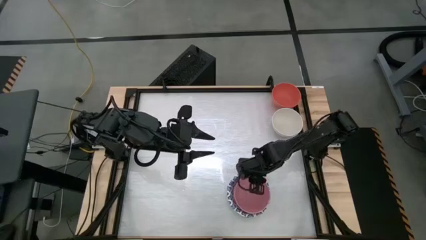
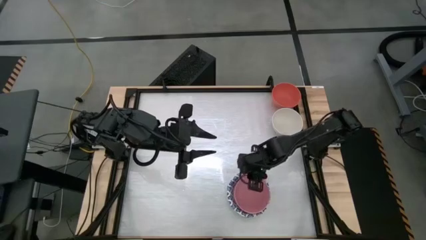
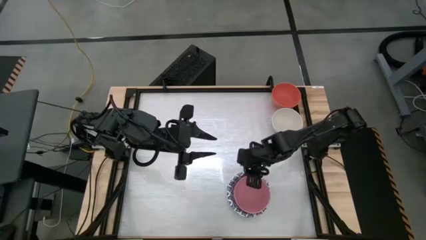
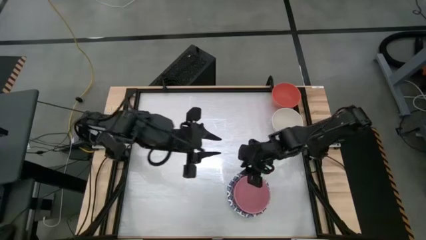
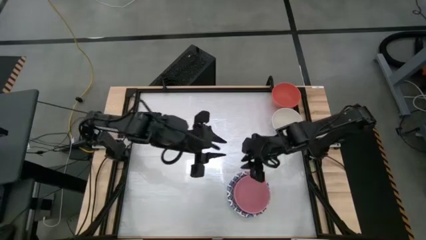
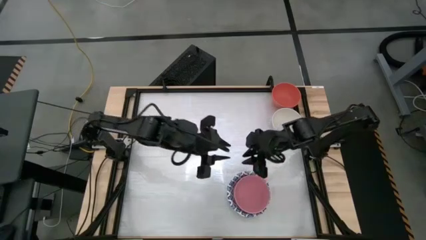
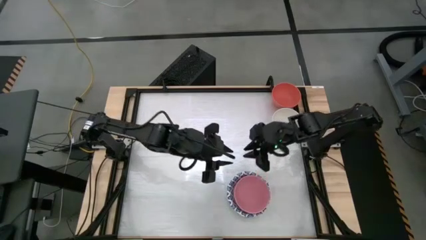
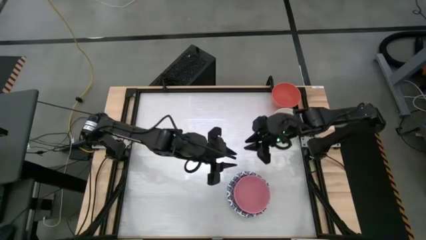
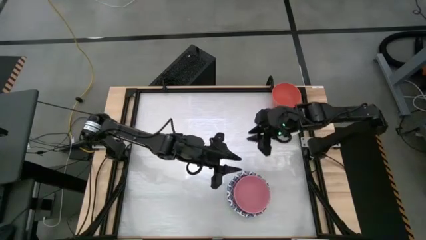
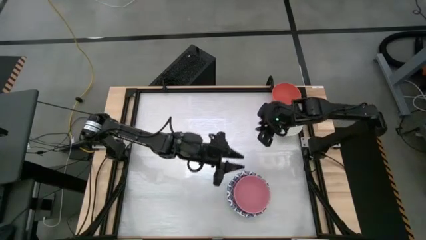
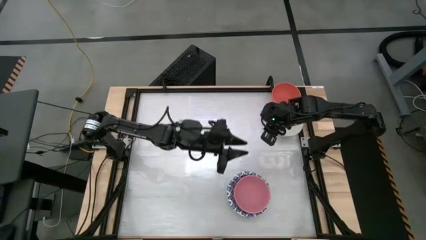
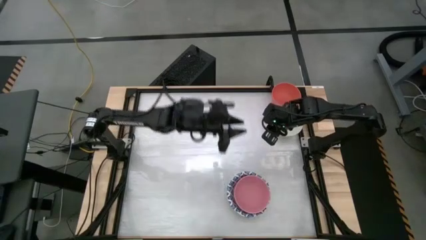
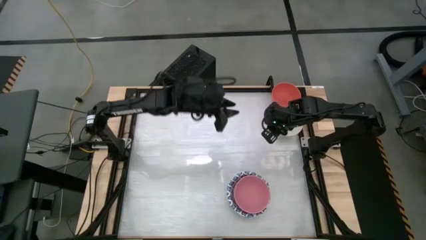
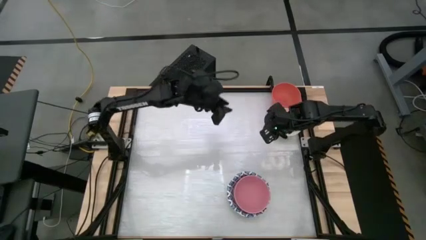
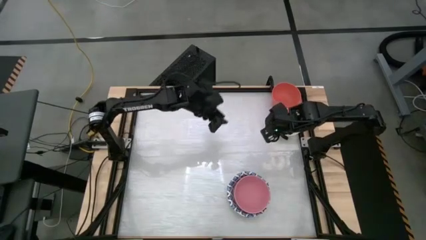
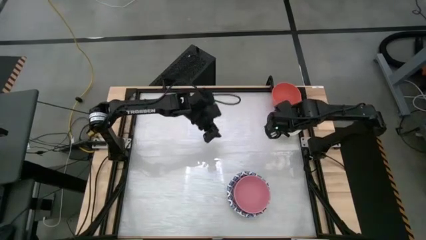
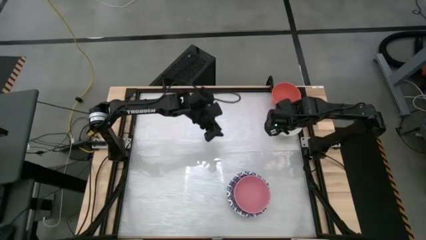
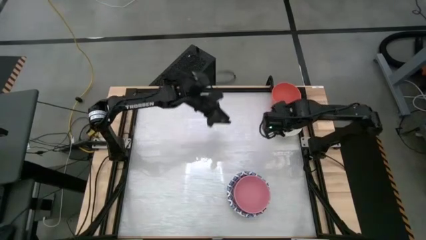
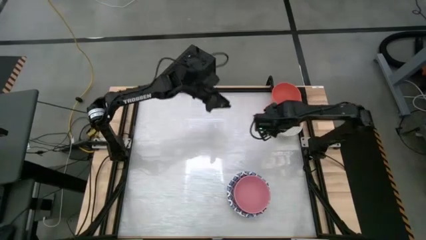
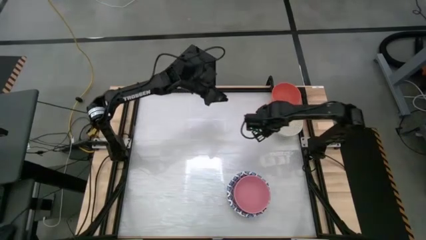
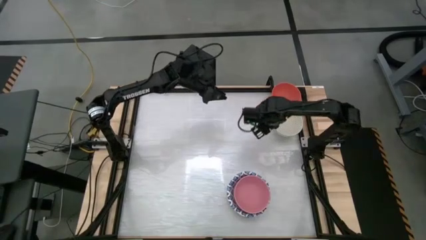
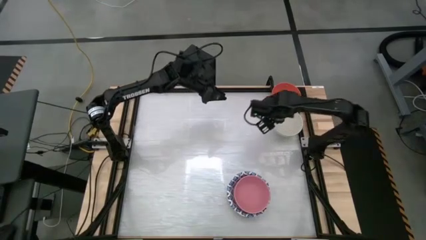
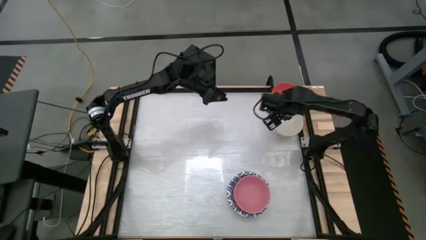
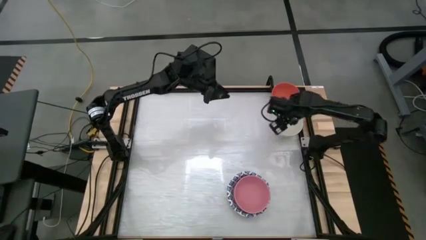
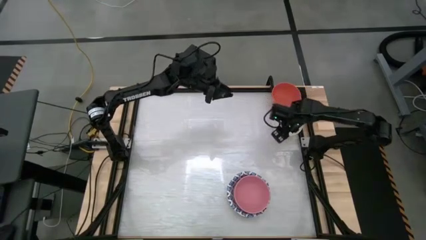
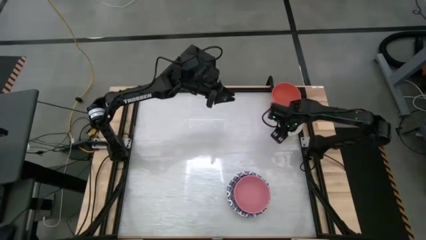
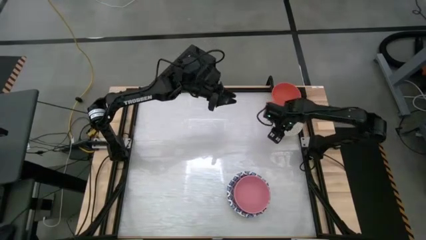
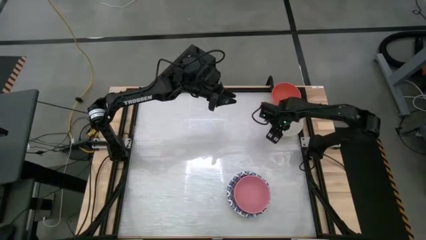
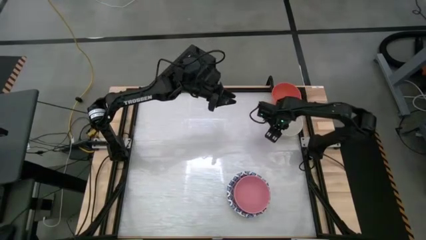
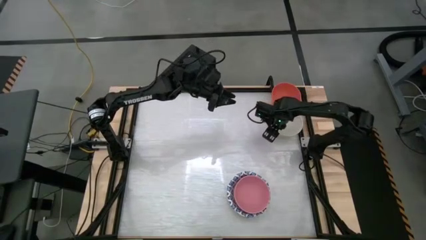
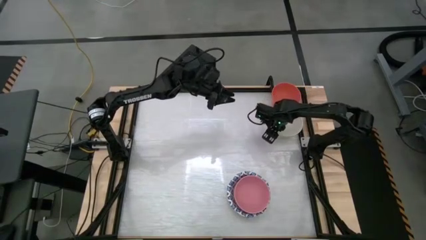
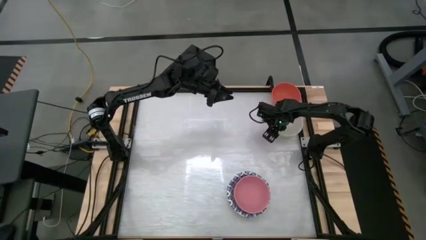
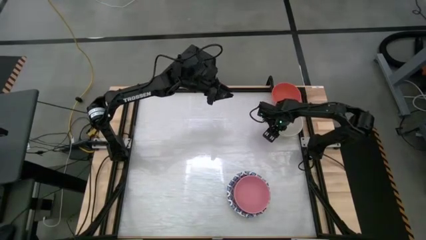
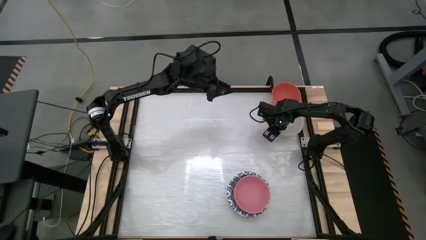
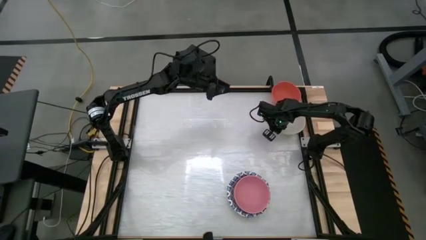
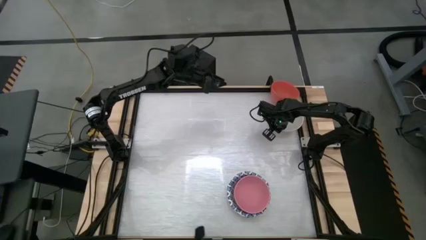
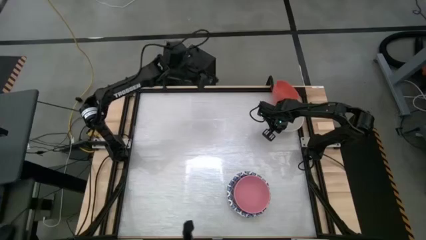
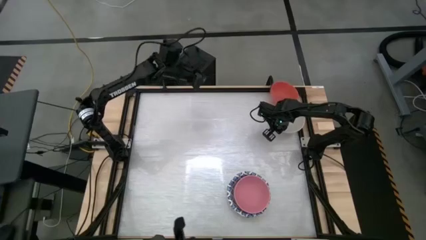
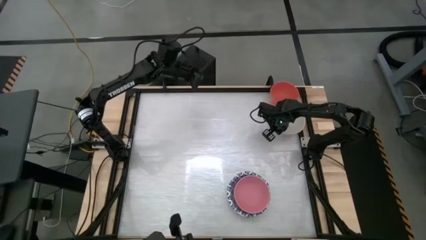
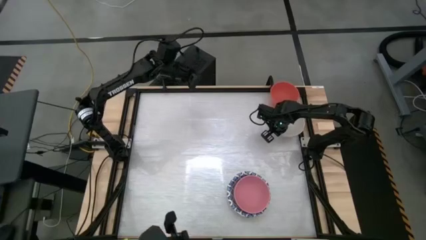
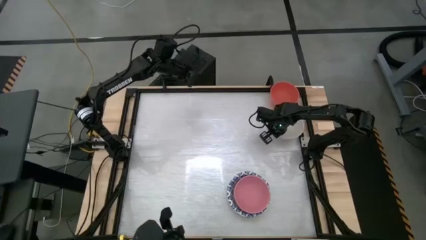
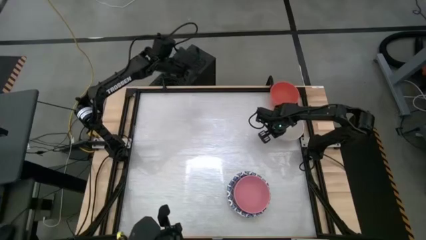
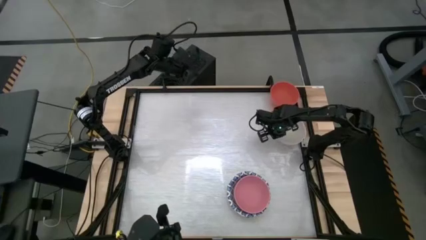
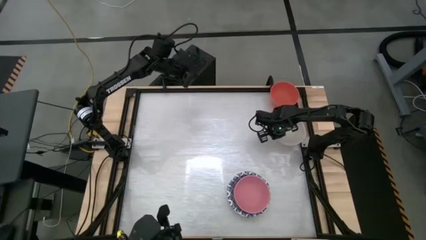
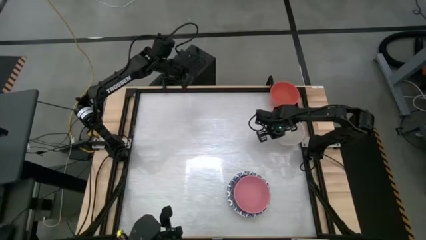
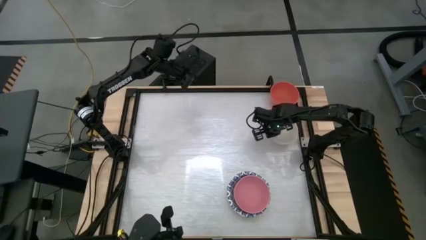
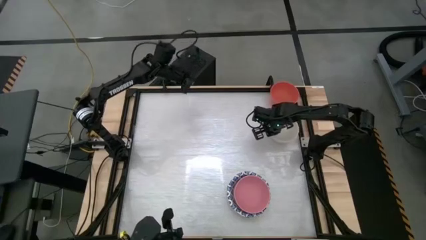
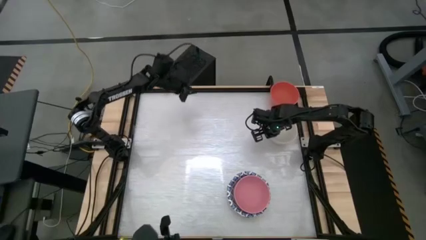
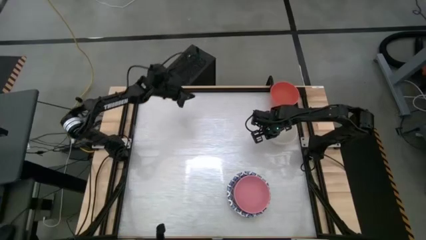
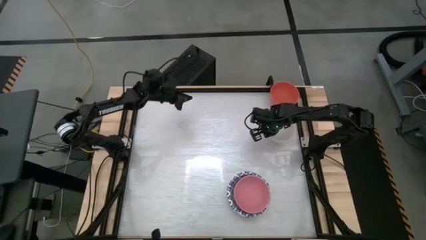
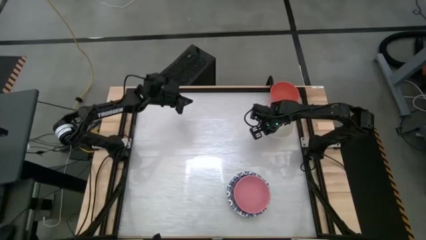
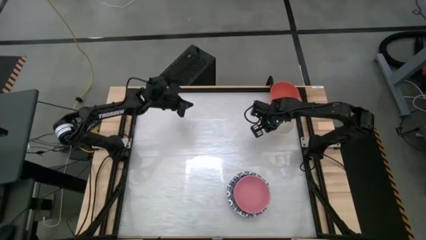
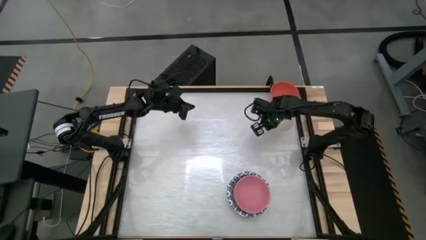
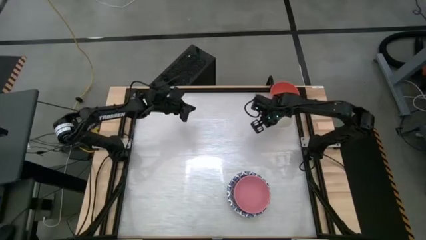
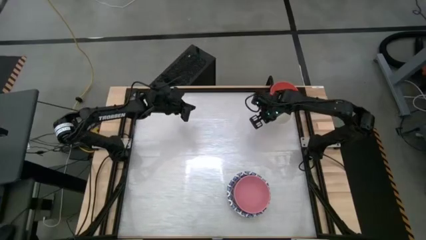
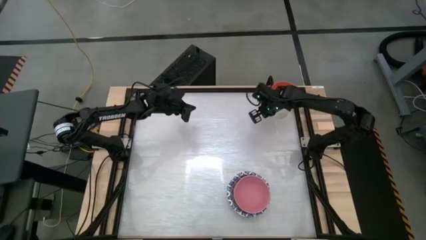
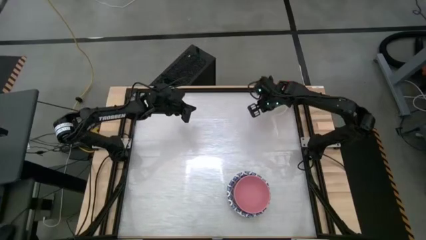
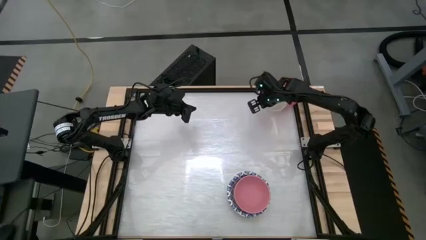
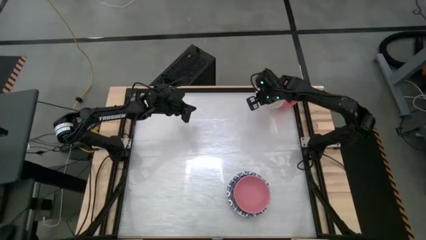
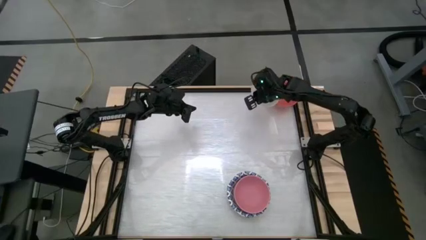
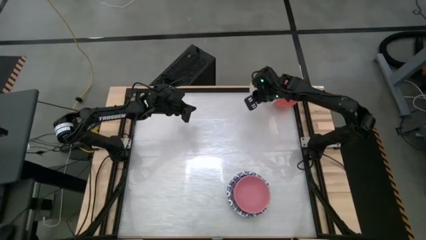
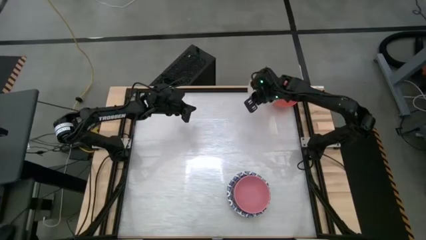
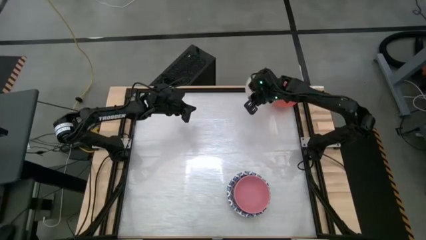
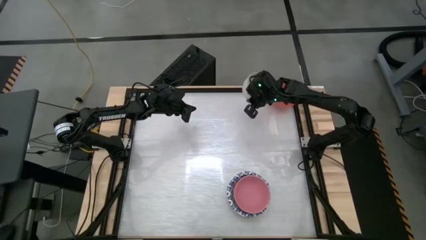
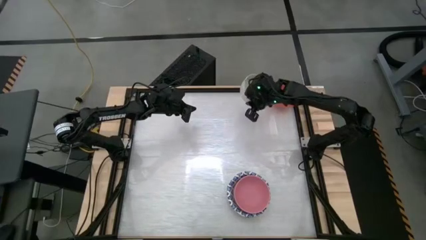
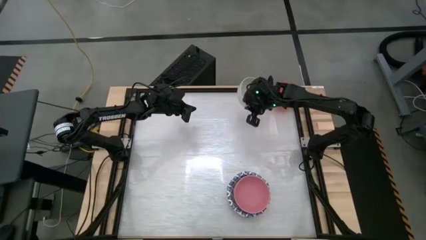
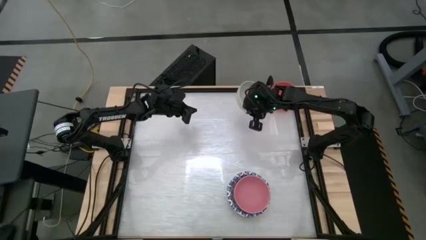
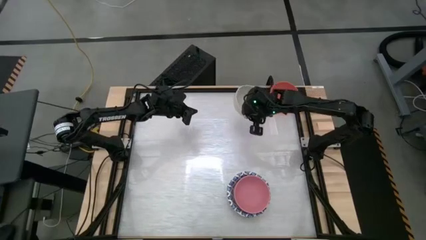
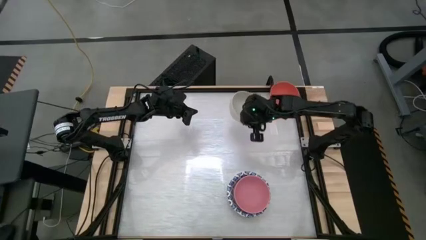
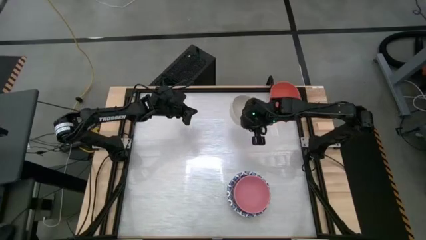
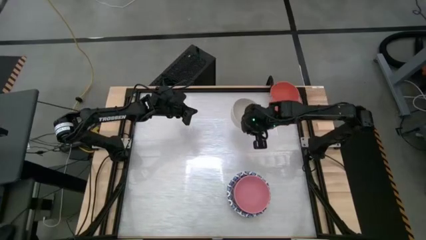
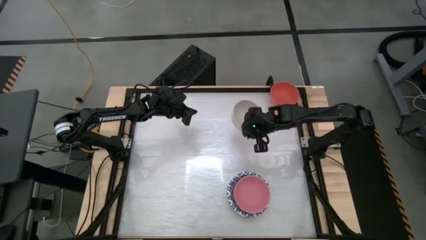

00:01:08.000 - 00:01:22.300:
Stack the white bowl on top of the pink bowl
